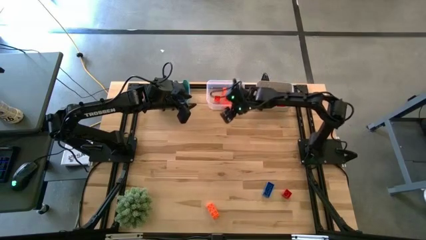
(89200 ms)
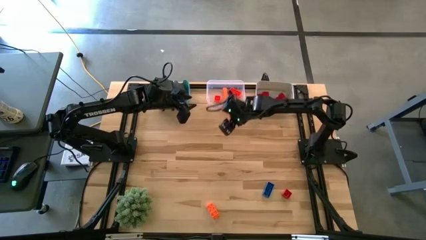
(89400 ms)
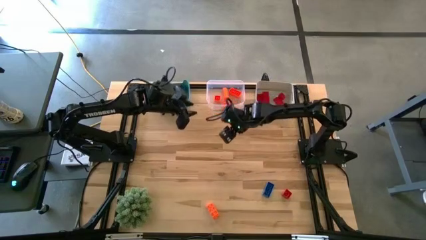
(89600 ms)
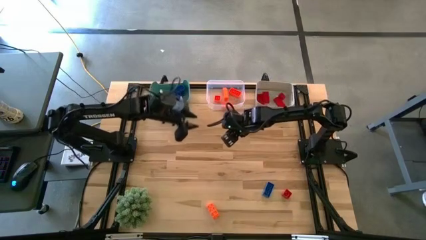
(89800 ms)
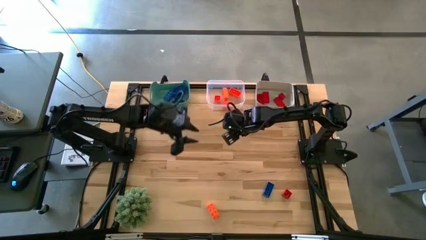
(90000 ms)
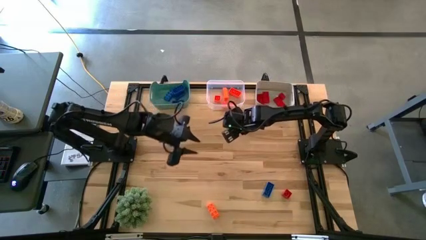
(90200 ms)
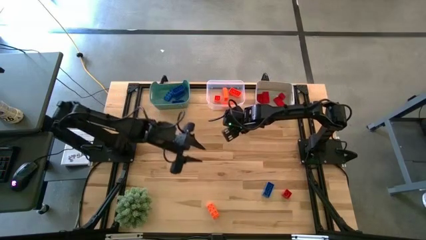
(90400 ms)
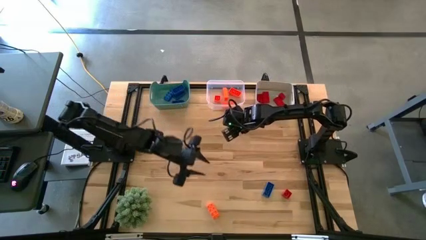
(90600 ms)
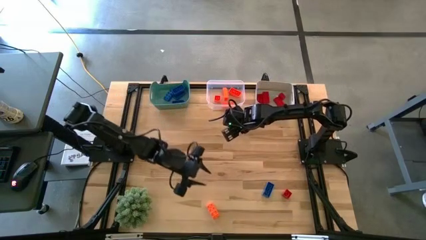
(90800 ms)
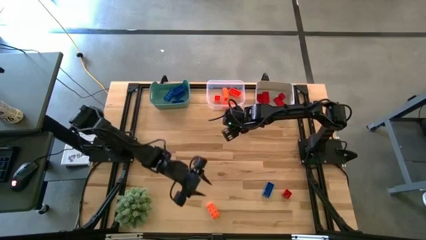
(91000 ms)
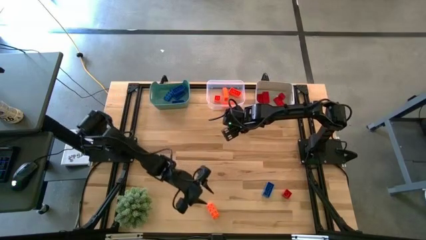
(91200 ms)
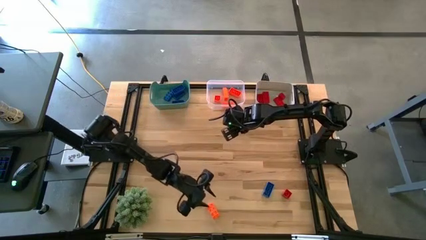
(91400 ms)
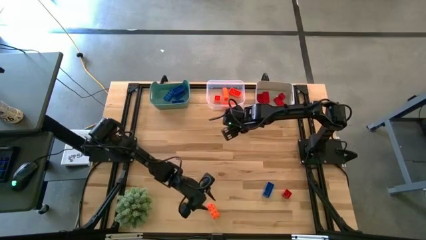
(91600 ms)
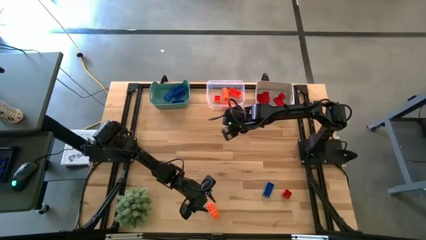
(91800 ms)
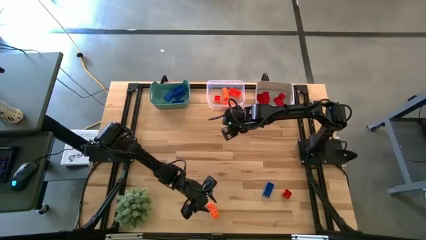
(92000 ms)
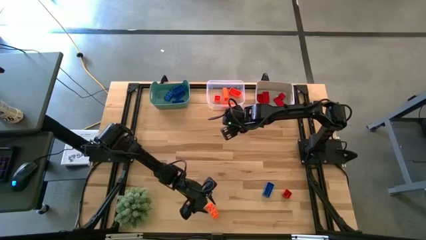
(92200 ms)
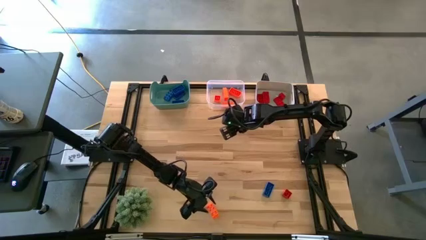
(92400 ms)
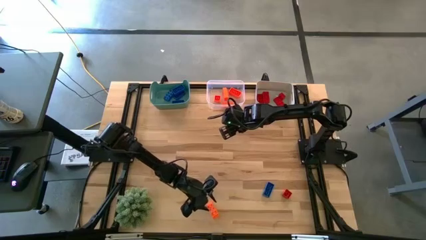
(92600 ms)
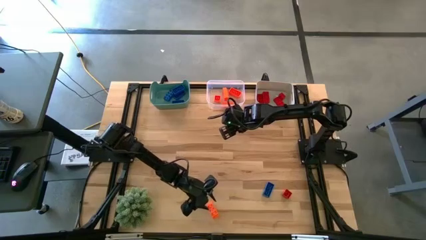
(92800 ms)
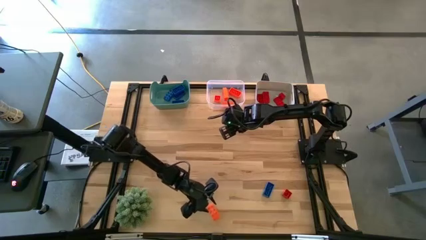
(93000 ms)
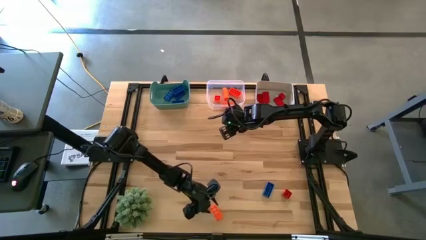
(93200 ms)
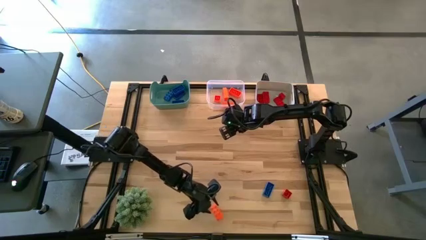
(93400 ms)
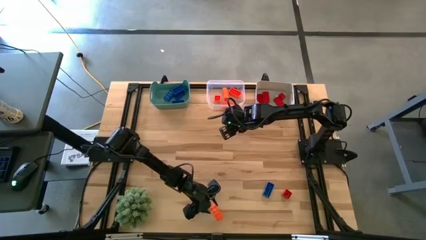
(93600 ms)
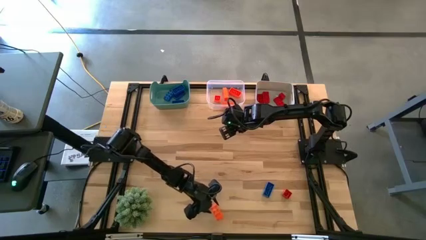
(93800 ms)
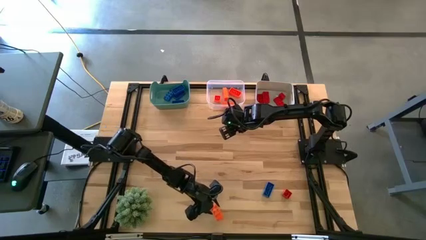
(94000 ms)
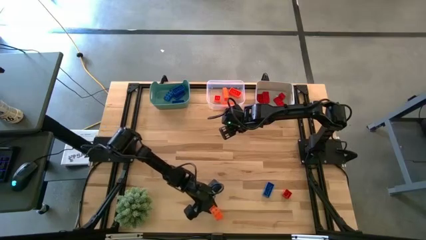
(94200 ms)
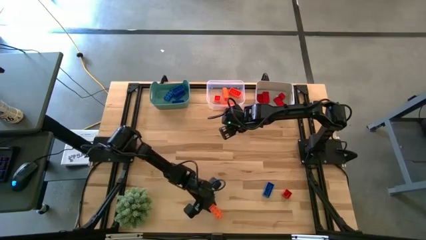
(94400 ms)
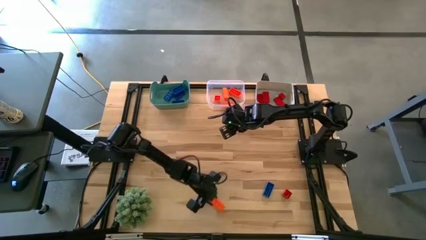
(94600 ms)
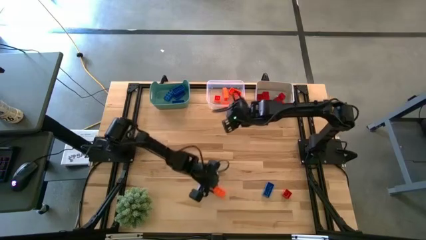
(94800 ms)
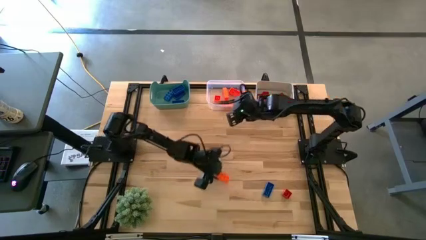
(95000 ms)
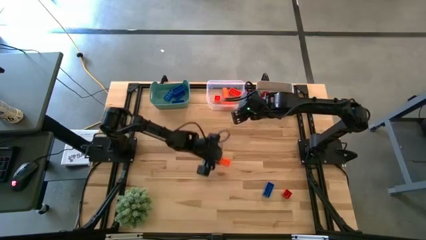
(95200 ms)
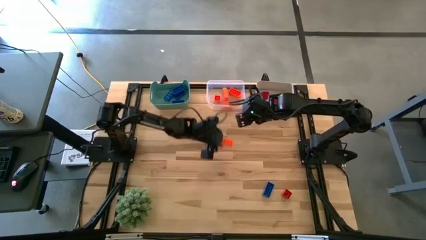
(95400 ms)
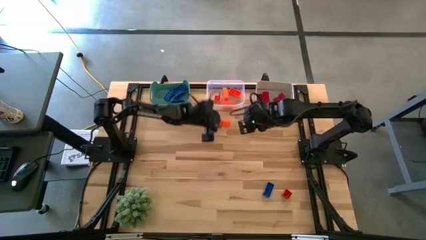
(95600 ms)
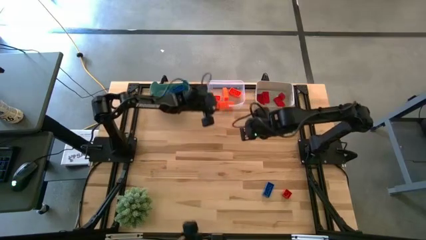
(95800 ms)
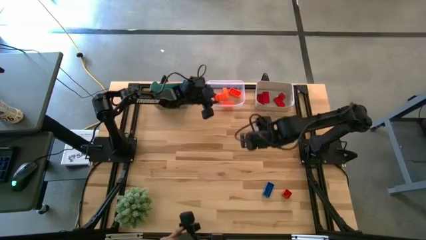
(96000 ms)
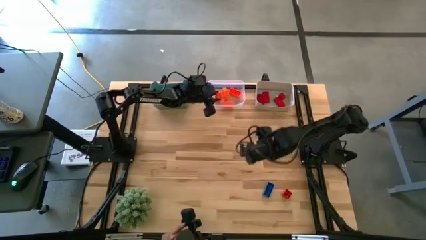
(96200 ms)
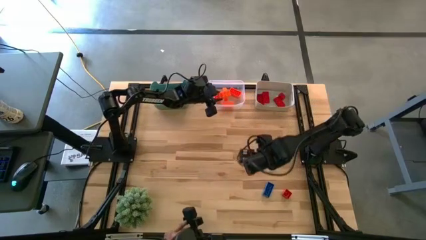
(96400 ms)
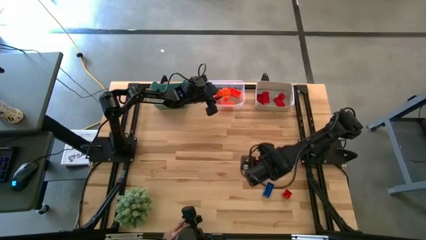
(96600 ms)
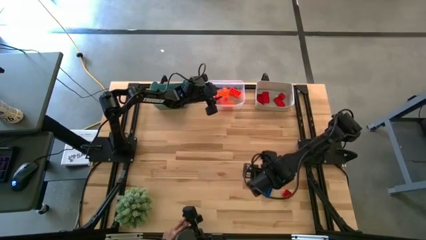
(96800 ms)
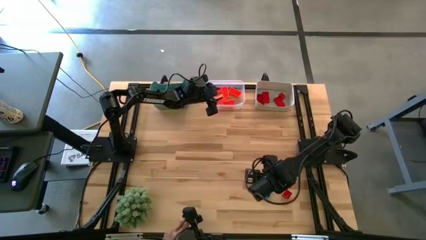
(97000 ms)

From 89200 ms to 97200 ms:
Task: Sort & place blocks by color
Put the orange game piece into the transparent bin

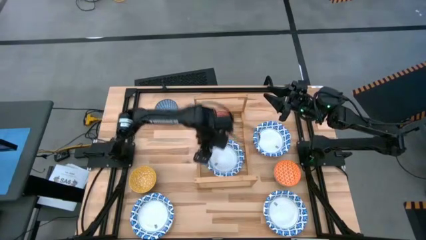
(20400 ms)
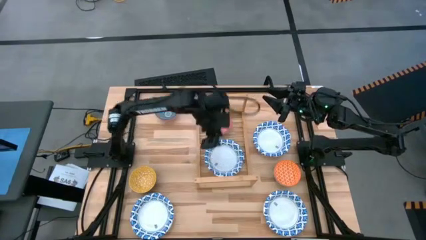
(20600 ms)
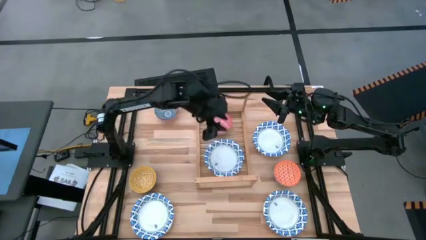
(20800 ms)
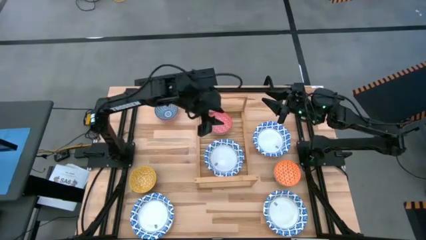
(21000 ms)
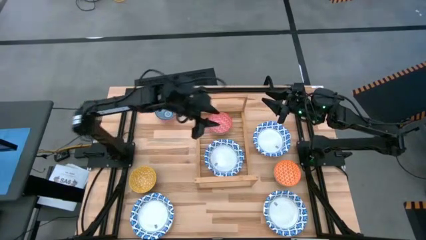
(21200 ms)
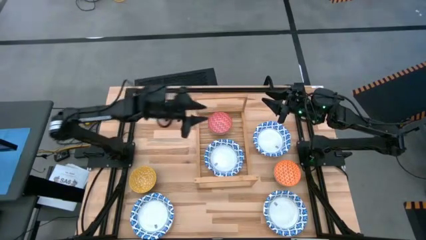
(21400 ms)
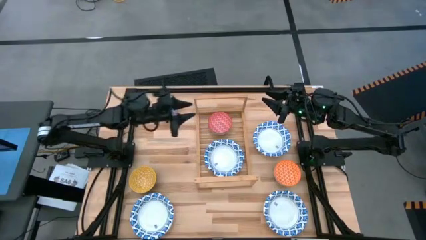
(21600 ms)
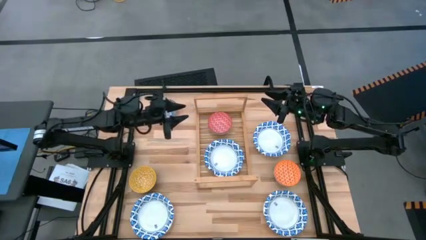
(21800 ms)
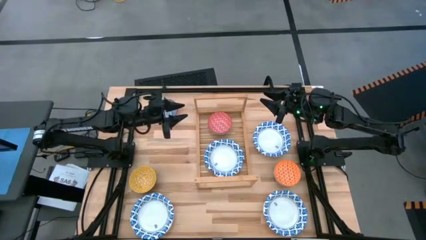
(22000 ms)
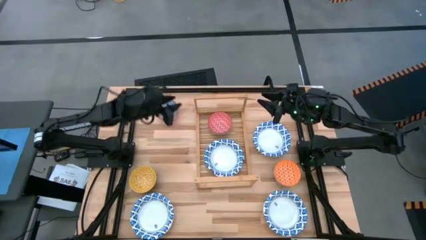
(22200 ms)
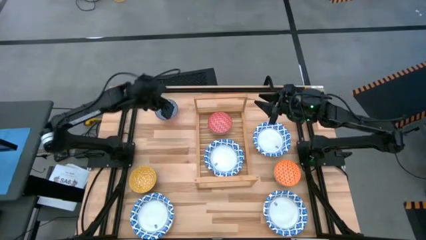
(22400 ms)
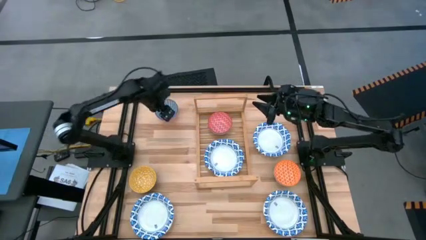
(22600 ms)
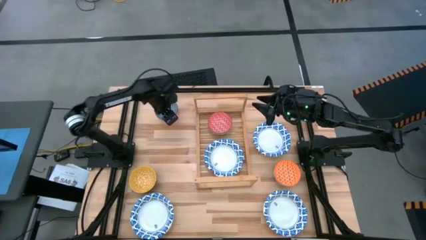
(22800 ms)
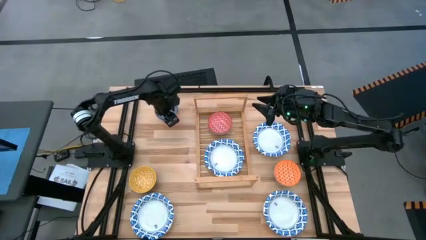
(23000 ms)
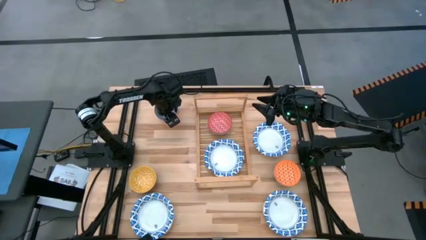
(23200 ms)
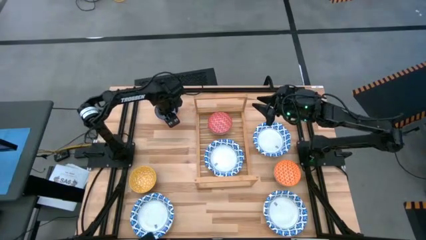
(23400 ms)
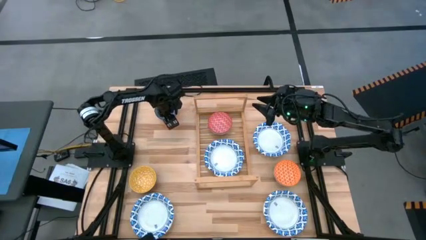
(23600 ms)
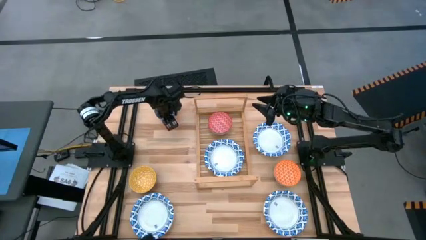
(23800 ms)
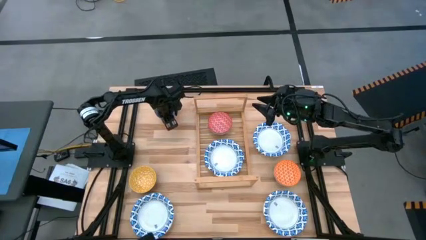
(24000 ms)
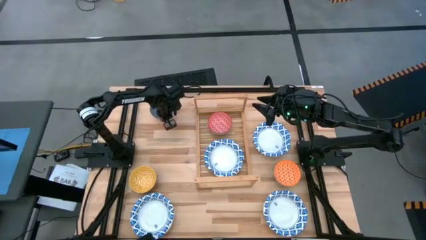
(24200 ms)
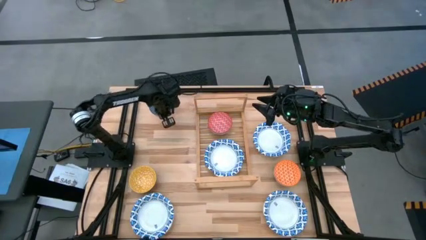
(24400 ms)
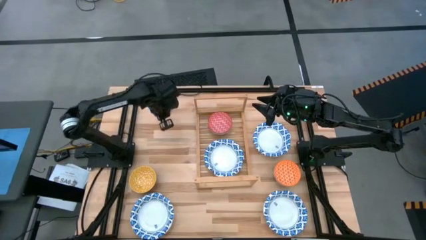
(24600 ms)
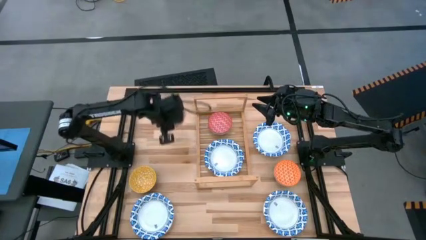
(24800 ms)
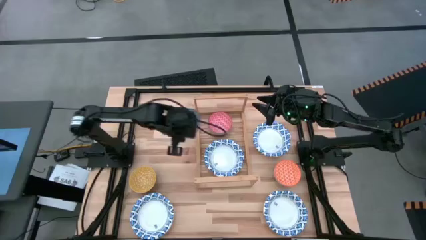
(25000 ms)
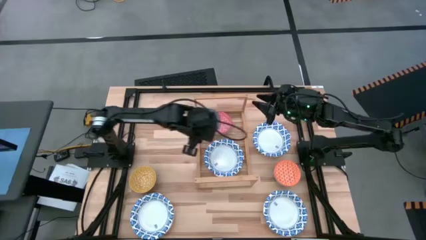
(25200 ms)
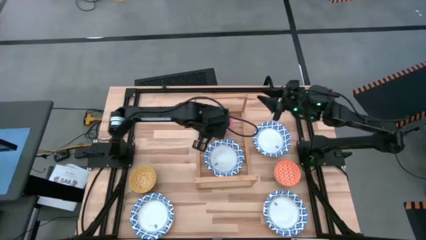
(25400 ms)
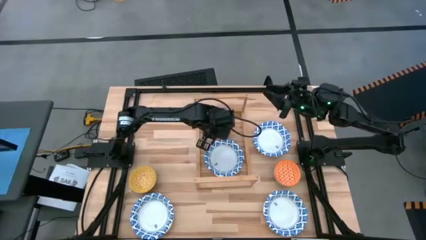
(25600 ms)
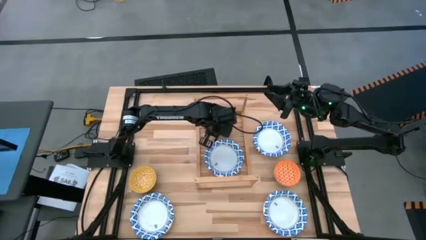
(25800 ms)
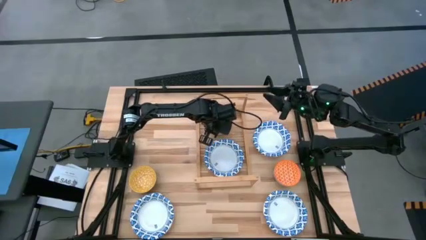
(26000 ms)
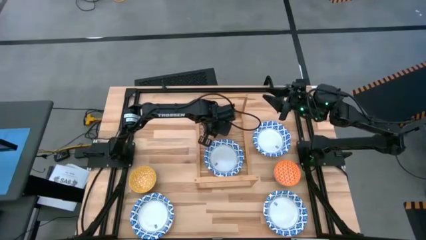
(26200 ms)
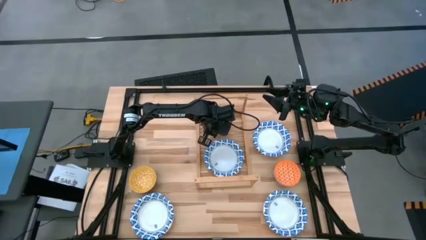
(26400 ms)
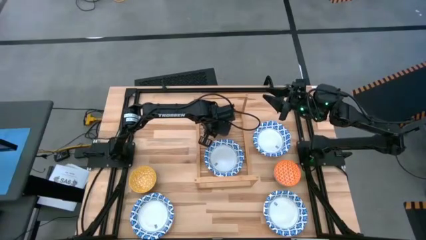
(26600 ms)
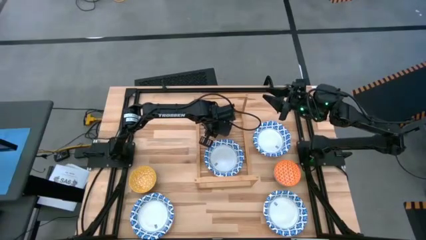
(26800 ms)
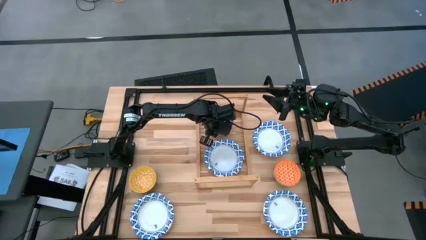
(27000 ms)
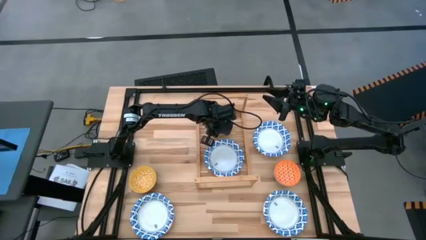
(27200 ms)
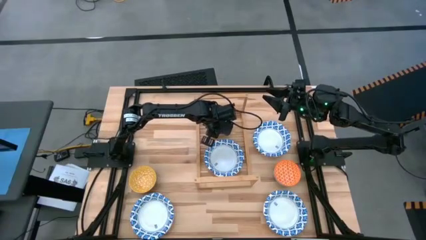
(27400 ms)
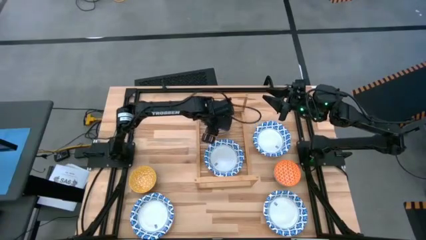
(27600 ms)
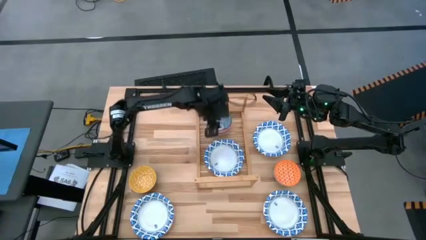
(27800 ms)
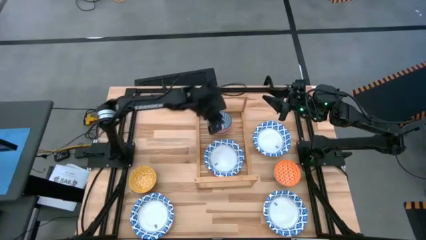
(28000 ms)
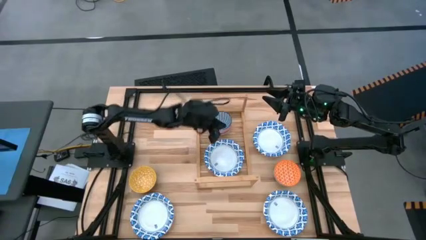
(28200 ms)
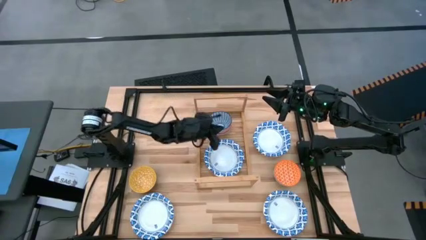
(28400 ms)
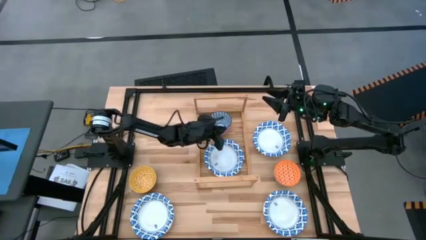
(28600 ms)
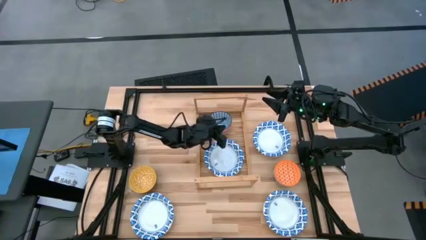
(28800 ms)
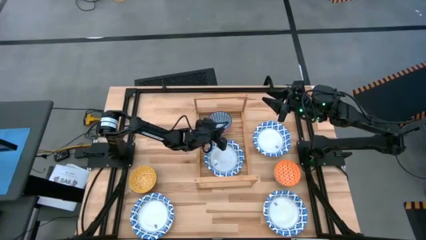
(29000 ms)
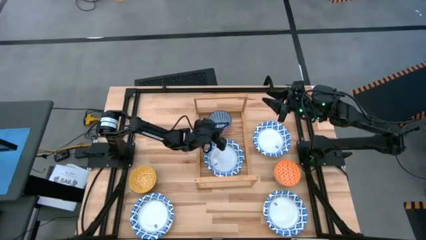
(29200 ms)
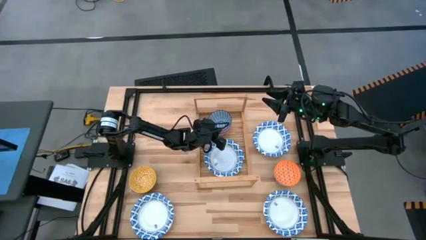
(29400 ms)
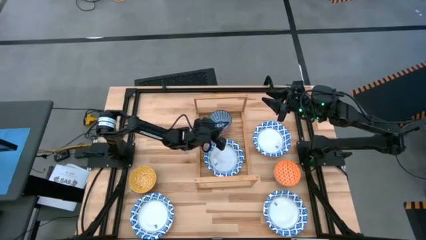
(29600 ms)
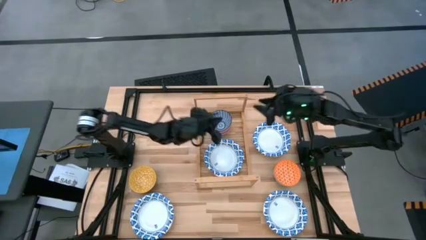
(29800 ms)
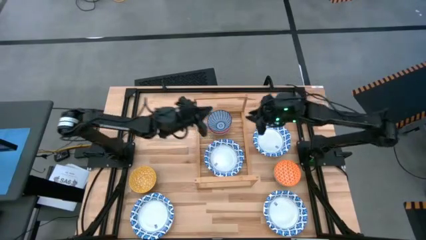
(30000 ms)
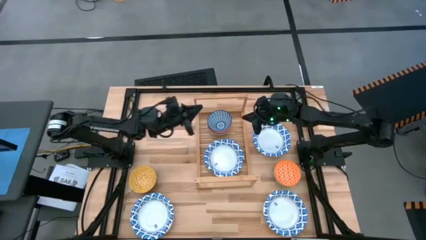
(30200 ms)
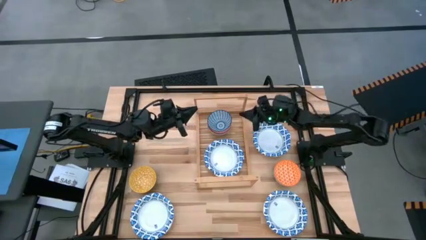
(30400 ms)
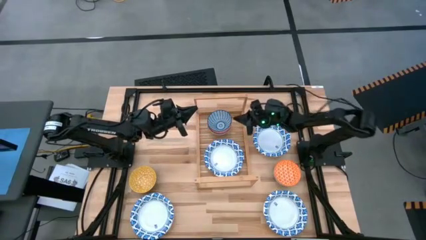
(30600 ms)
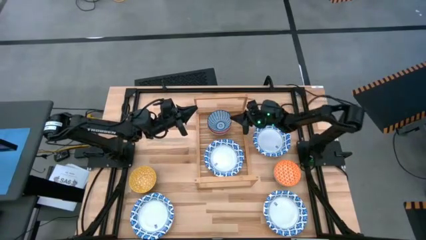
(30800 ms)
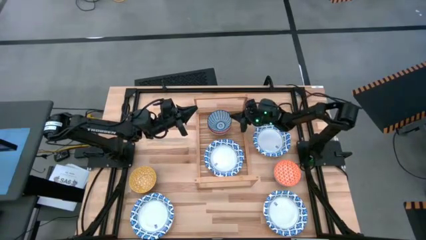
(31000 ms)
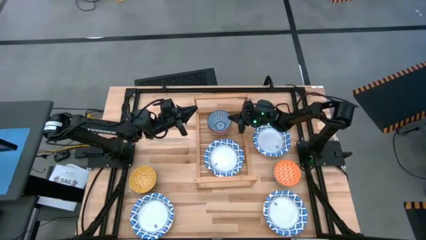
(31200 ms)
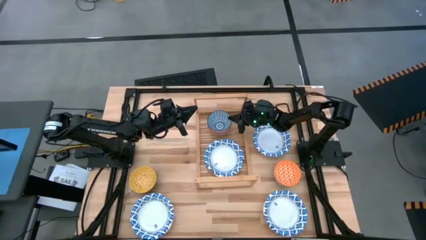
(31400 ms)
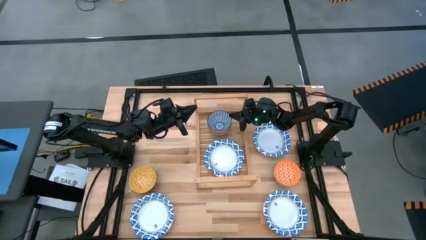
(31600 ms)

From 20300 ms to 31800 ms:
Task: Place and stack bowls onto a shelf
Stack the blue bowl on top of the red bowl on the shelf
